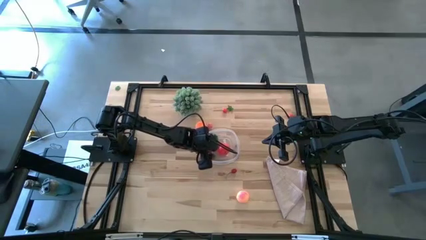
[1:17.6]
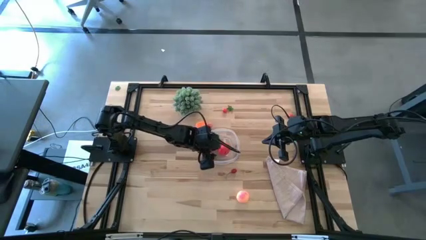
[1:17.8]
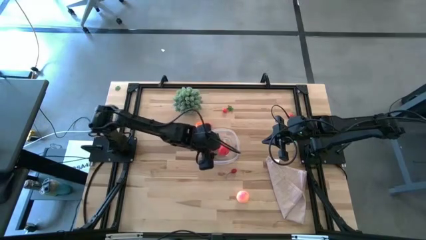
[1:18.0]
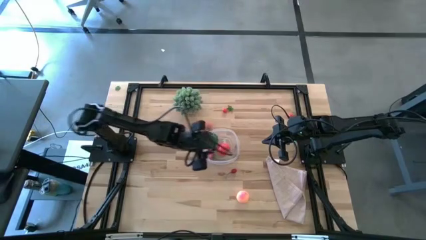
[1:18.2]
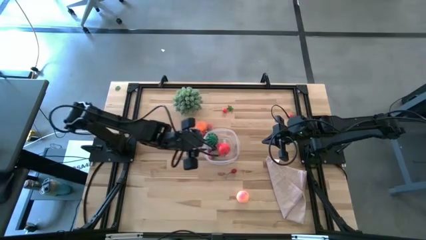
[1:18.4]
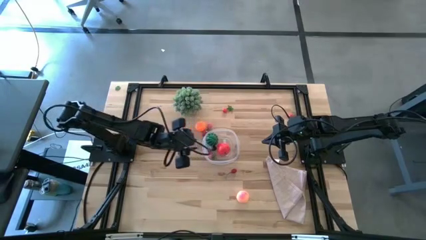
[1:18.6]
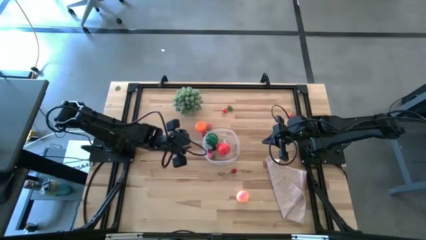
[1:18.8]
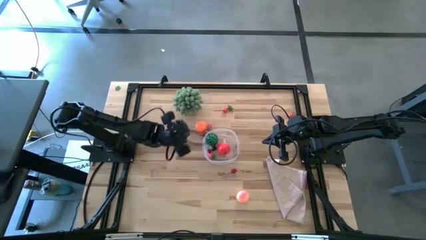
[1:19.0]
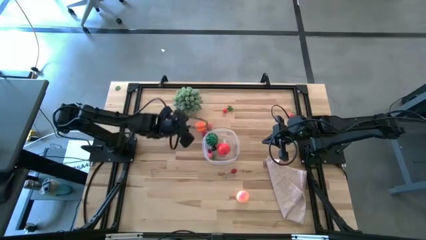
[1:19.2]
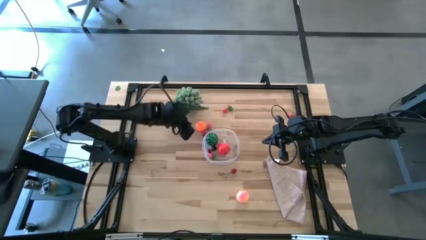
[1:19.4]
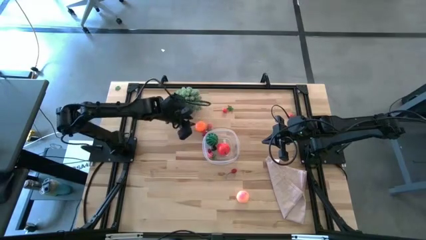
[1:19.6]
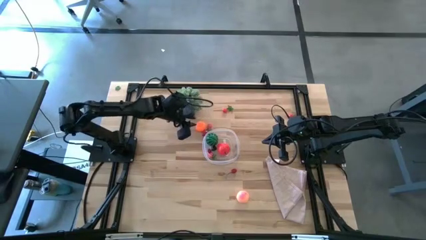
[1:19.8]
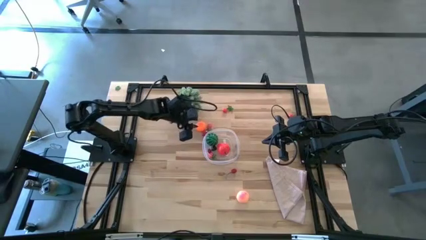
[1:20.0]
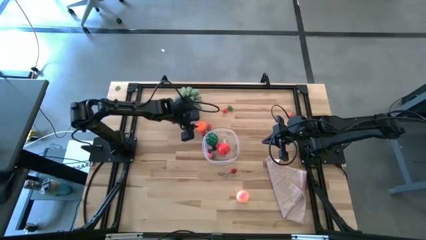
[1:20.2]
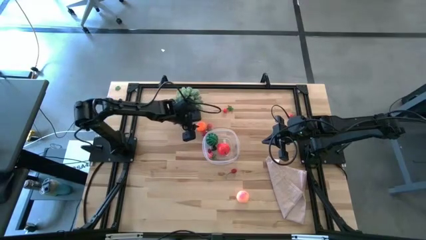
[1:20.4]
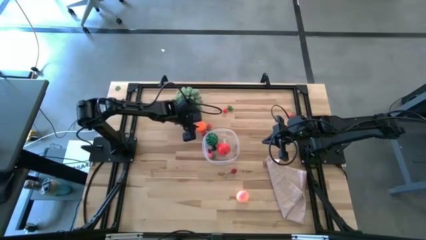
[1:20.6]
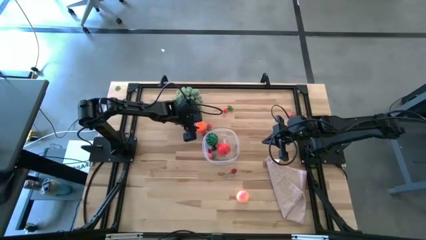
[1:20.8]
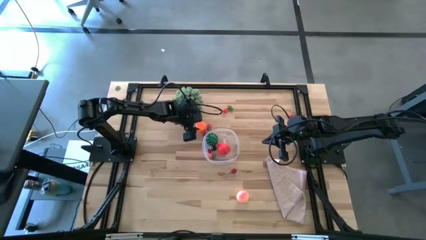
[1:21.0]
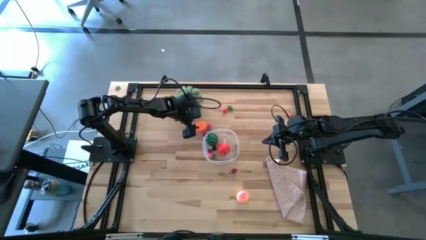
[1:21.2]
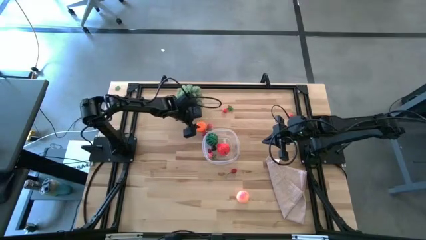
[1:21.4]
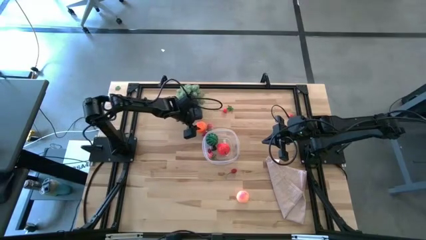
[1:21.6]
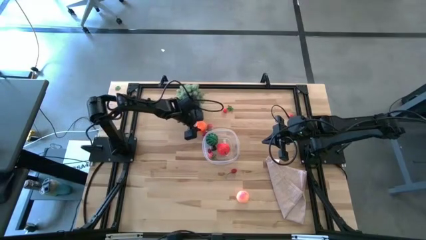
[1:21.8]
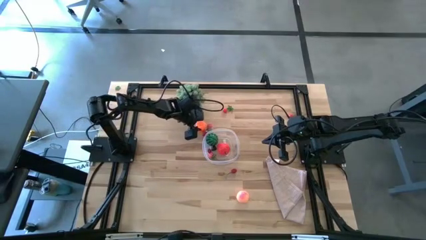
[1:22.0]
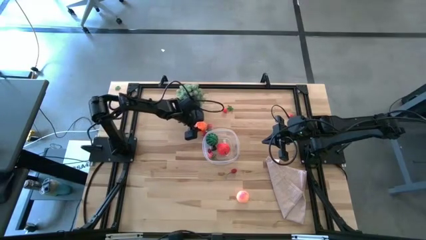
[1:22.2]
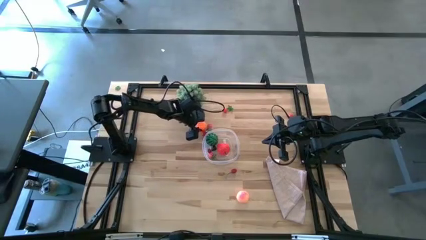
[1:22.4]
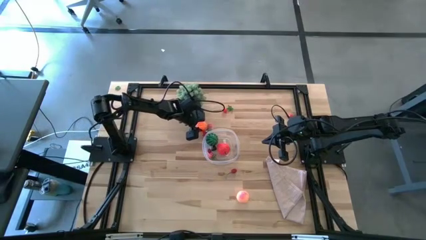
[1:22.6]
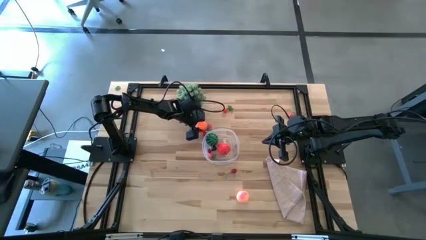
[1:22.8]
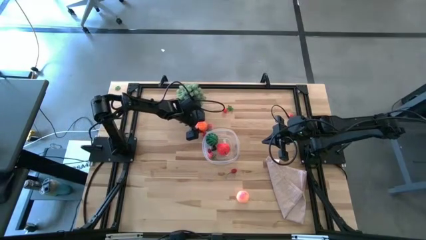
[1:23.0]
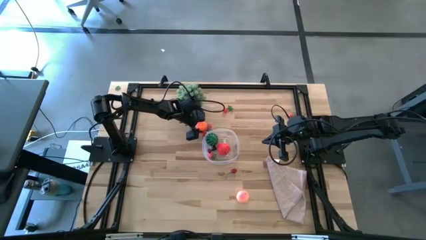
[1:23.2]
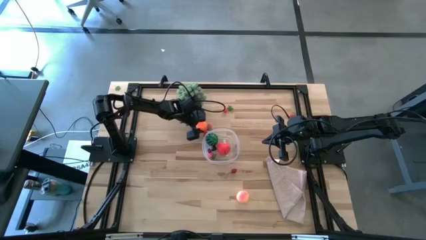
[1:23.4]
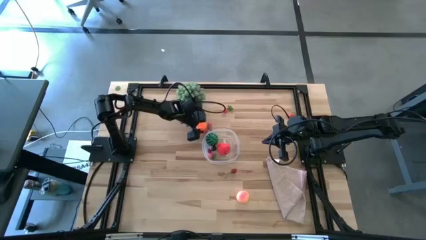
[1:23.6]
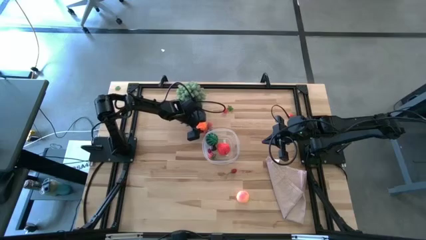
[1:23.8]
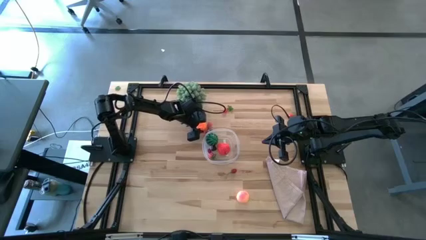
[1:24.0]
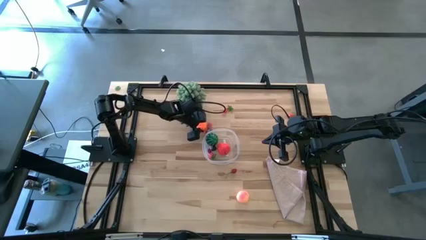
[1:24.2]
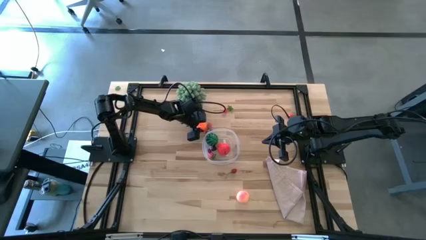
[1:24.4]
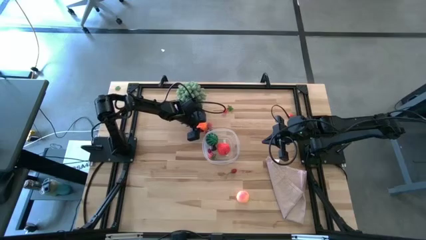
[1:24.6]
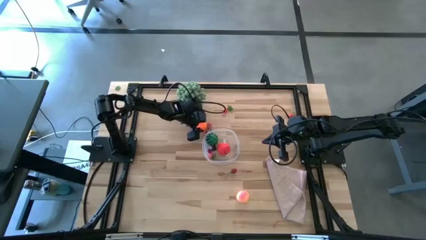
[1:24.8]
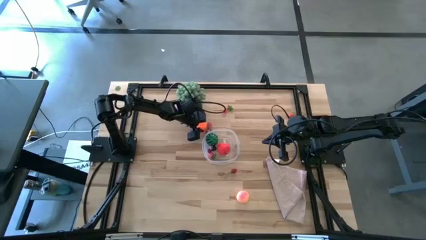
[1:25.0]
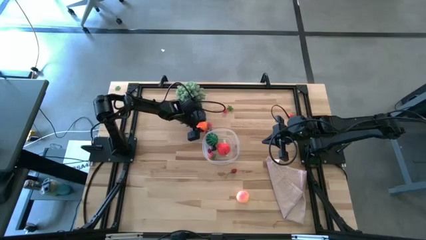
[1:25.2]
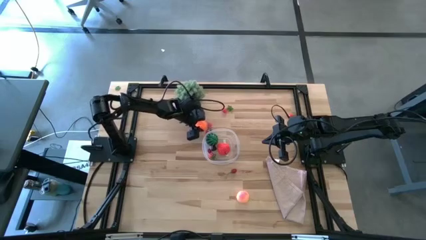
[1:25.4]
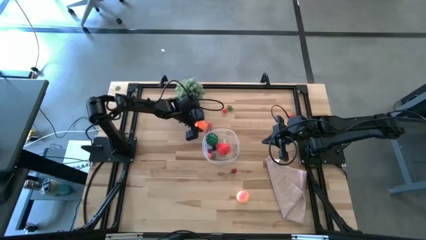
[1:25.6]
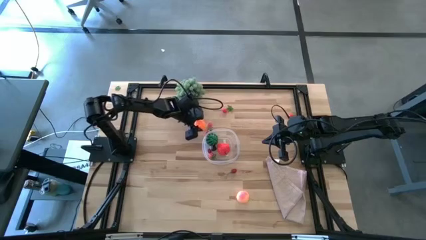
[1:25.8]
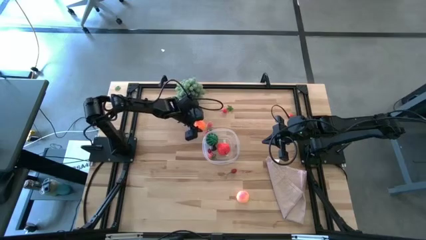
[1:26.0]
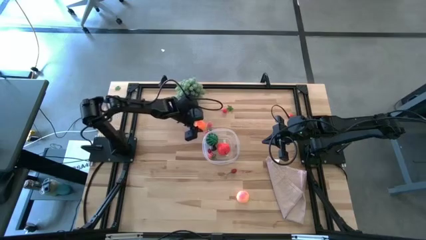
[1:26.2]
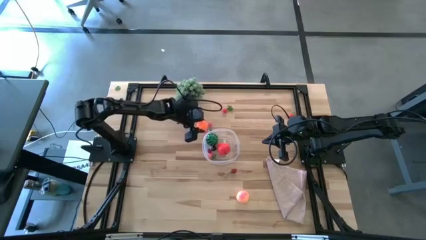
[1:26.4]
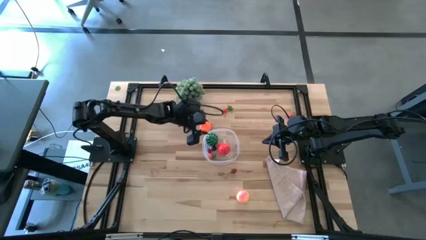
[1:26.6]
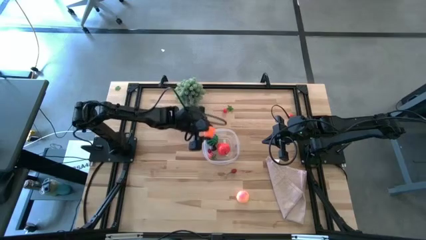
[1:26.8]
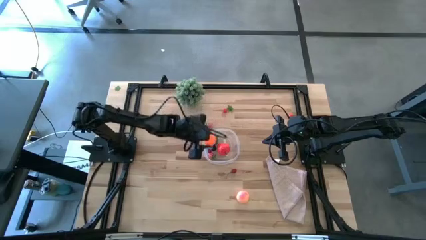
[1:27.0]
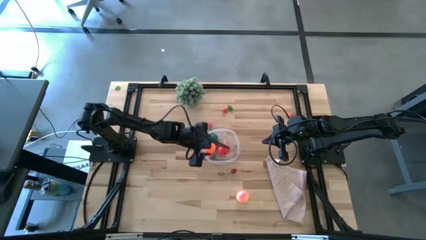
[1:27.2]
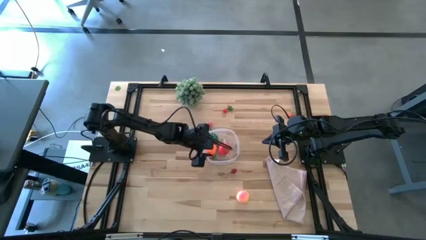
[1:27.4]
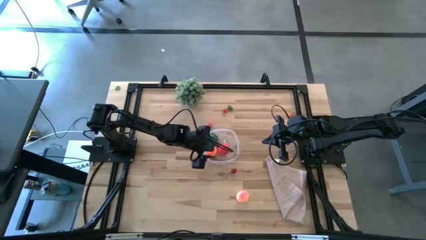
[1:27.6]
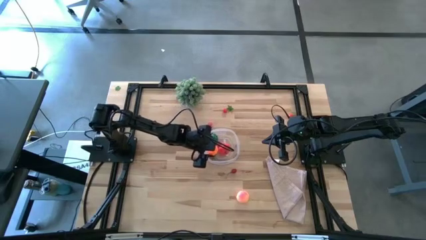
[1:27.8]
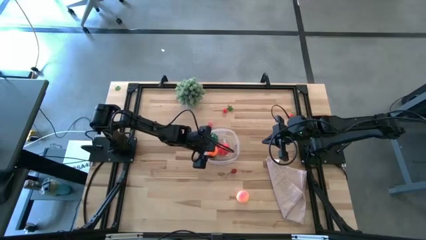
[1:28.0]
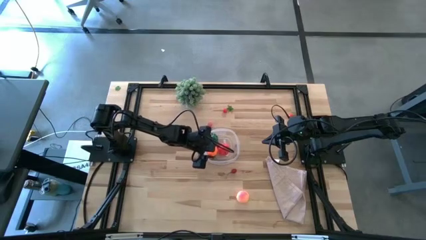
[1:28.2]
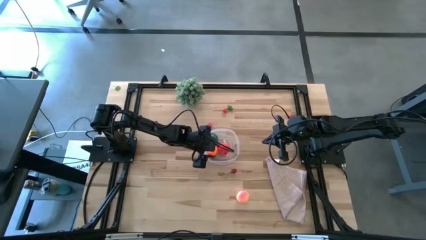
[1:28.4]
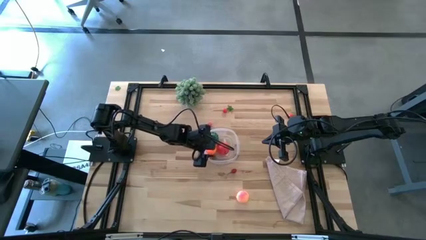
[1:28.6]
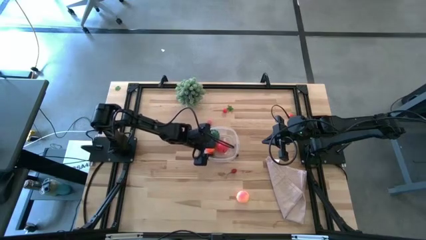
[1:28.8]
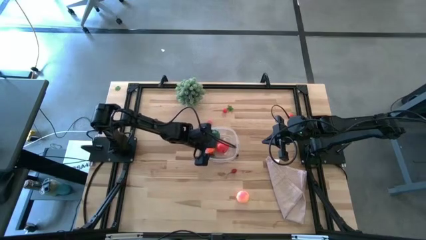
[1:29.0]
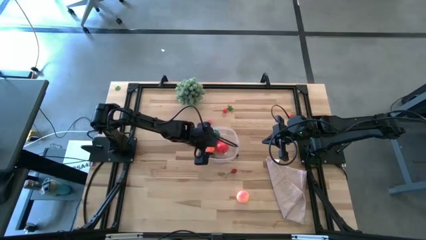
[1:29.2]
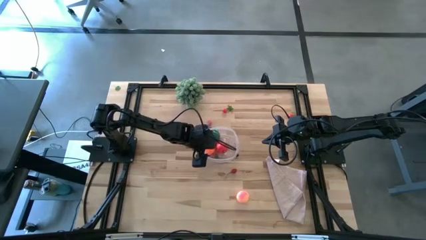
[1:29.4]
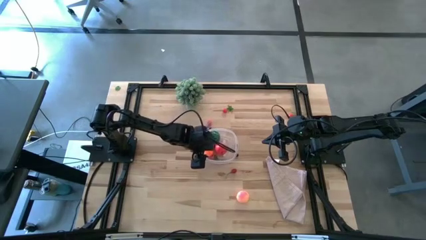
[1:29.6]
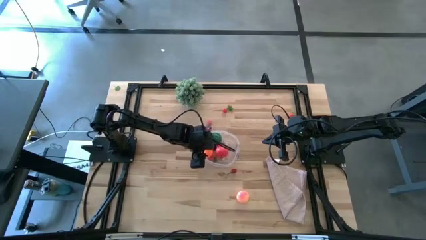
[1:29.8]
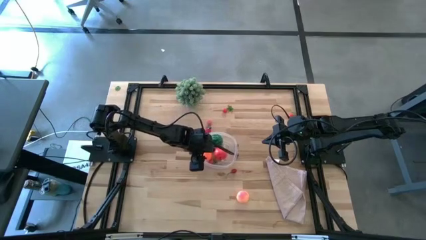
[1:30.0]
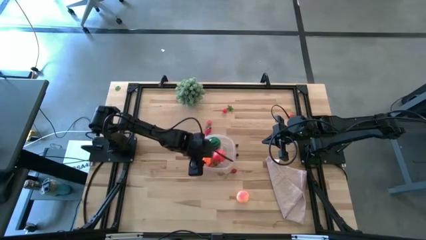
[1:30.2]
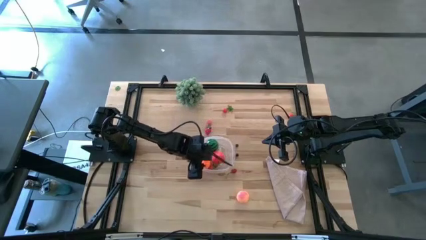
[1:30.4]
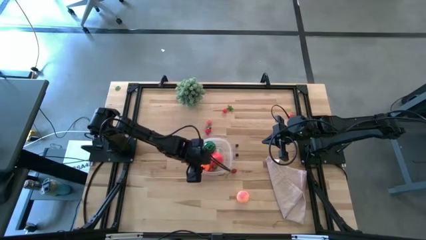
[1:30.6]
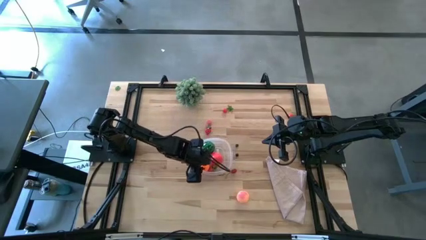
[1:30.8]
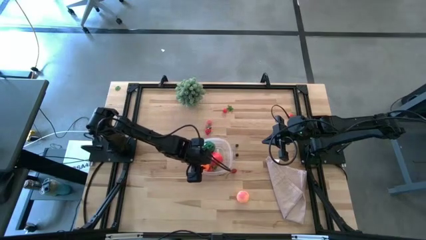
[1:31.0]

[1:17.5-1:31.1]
Task: Pick and placing Produce into tupperware
Put the pumpkin into the transparent container

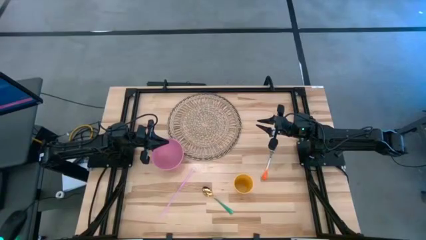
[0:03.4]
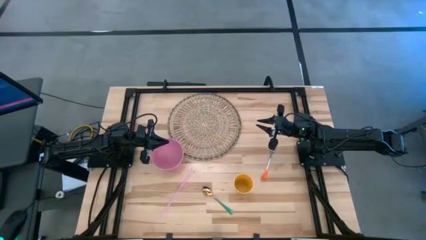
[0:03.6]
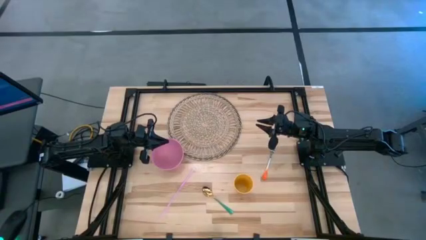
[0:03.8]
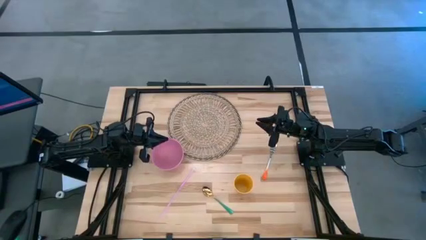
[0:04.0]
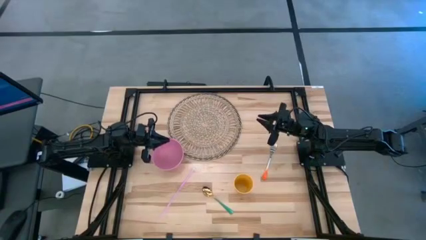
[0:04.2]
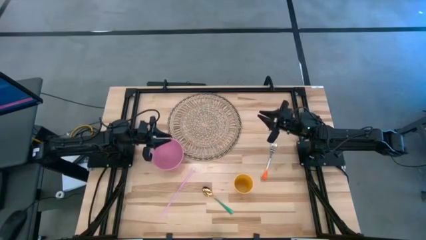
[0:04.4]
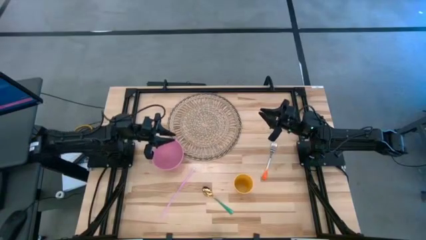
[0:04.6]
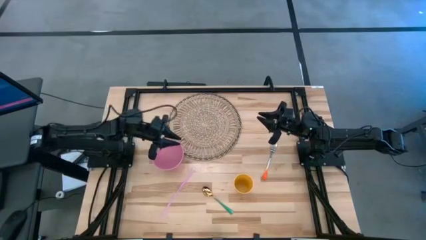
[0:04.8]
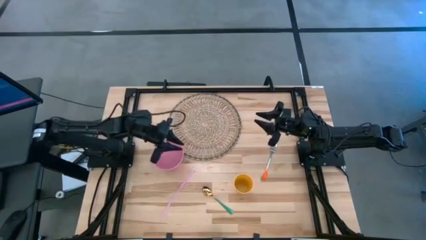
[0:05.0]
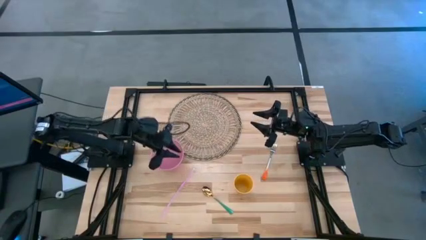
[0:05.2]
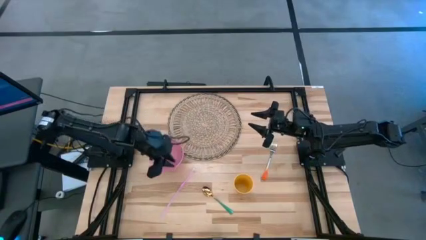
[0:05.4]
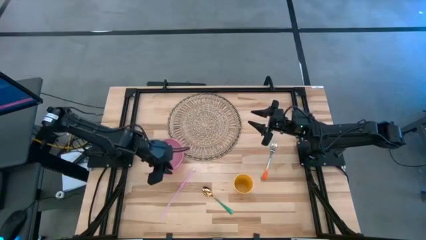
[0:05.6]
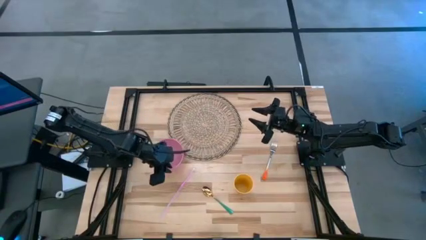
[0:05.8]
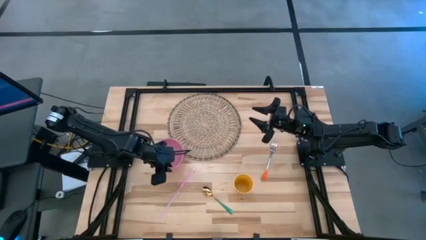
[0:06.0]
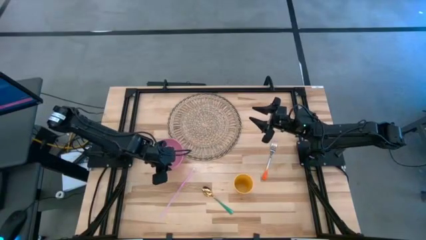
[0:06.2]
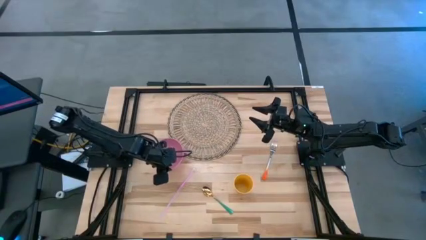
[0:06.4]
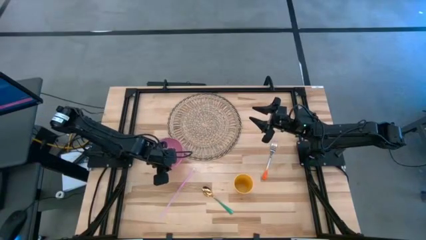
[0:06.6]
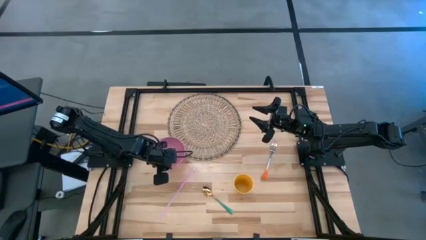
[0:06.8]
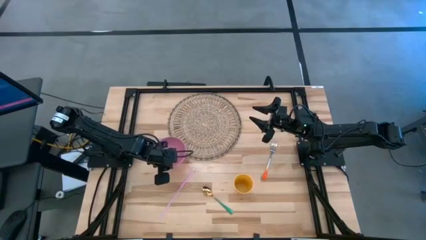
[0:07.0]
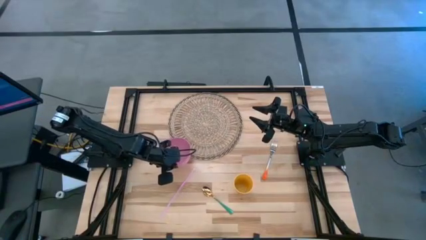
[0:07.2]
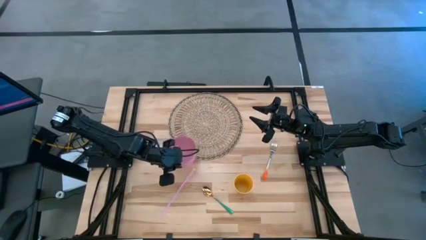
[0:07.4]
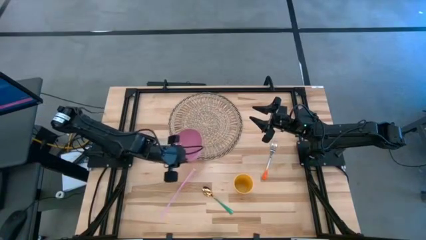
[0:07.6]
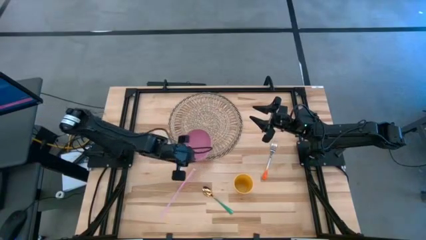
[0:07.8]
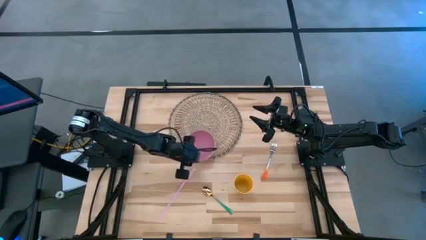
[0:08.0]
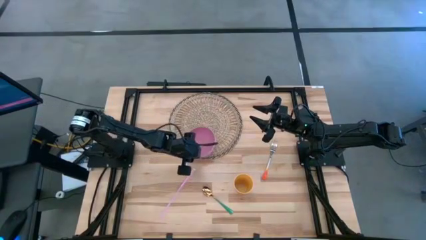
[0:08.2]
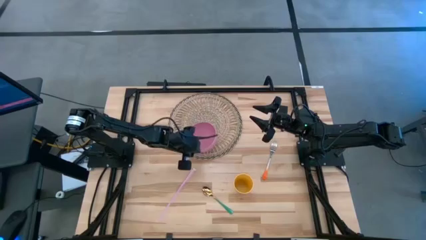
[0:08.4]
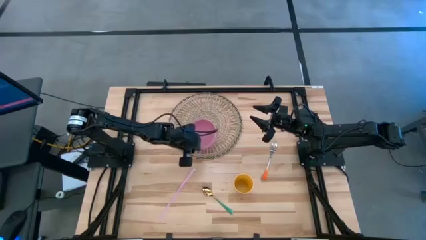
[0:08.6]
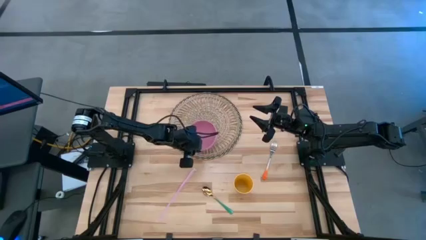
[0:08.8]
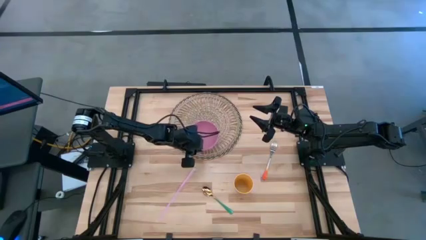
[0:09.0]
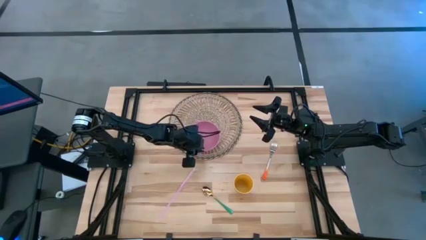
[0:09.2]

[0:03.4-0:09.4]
Task: Pick & Place Utensil
Put the pink bowl on the brown table mat
